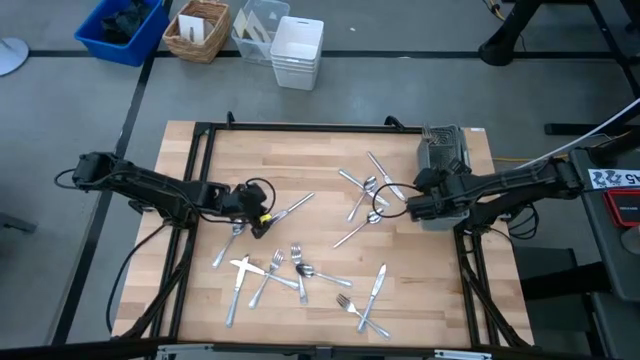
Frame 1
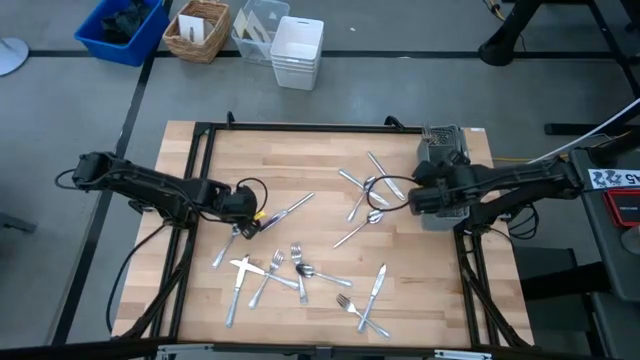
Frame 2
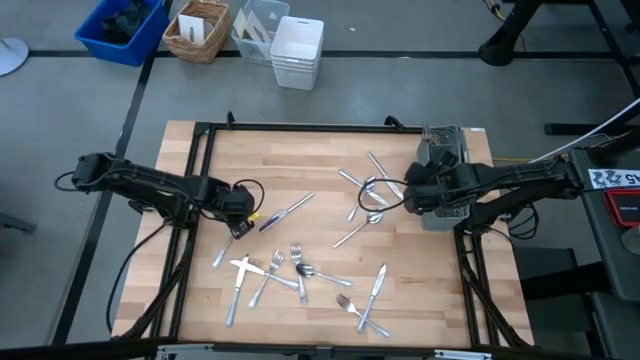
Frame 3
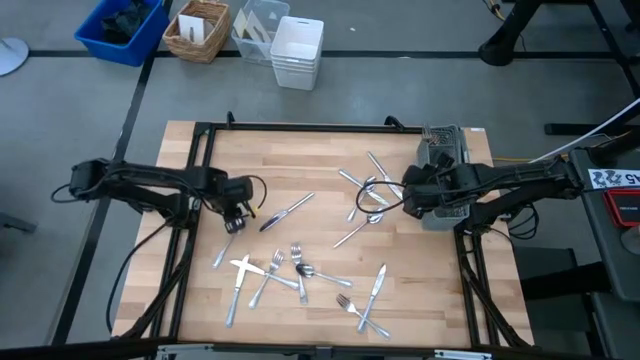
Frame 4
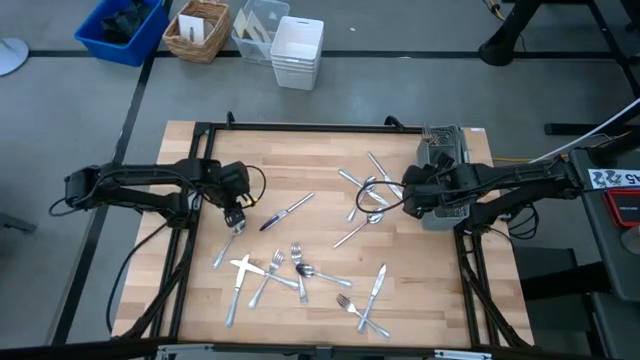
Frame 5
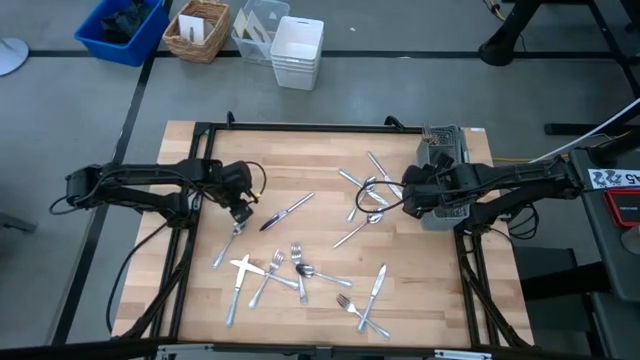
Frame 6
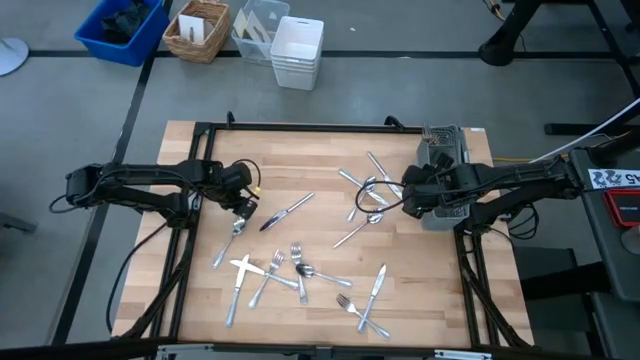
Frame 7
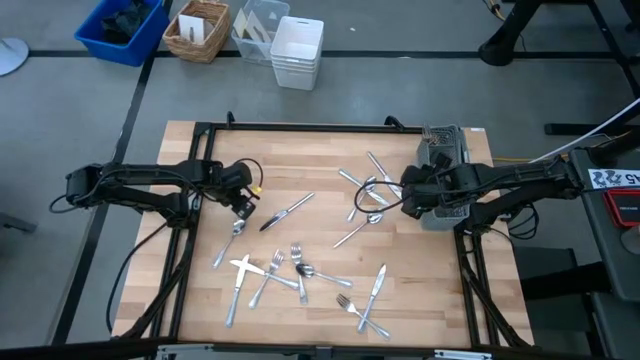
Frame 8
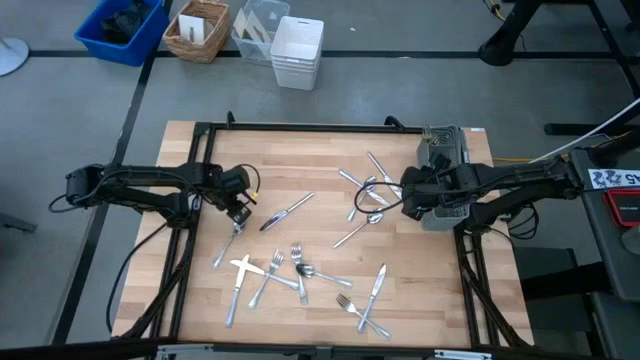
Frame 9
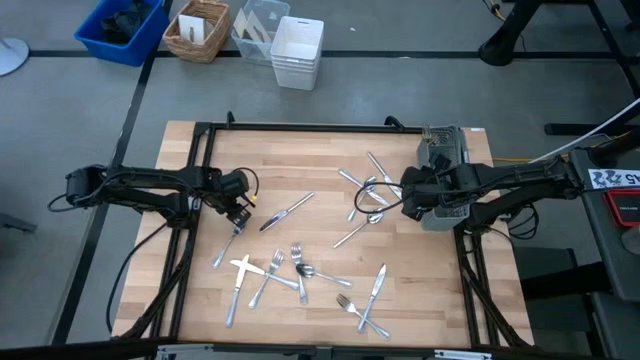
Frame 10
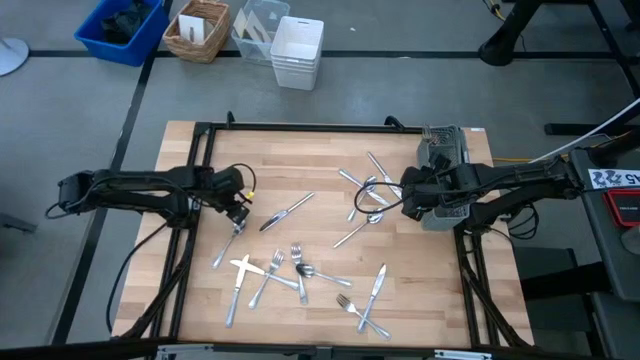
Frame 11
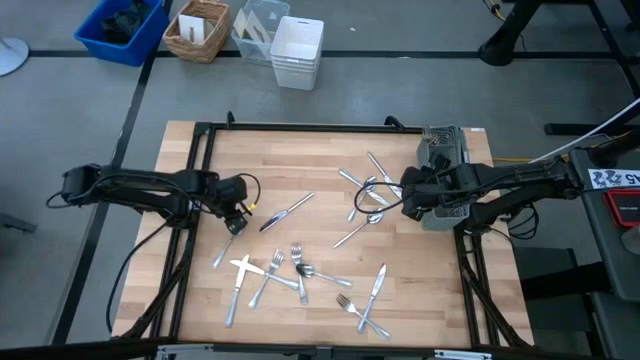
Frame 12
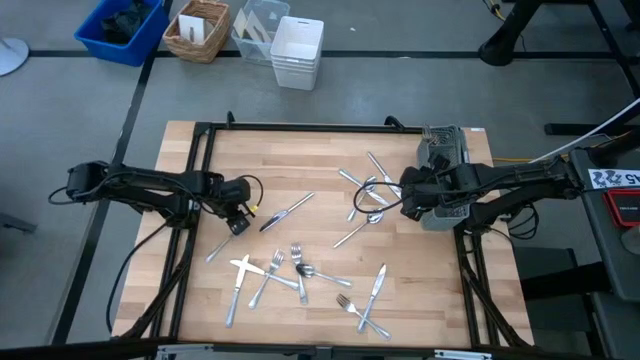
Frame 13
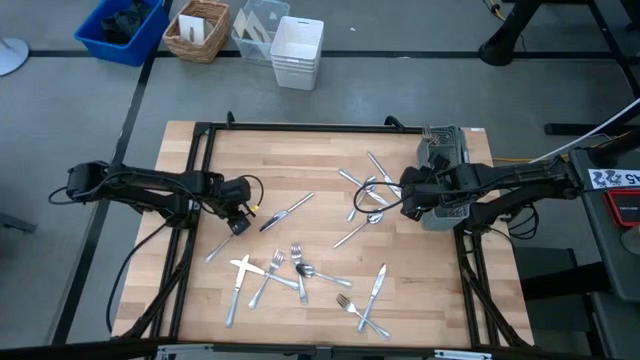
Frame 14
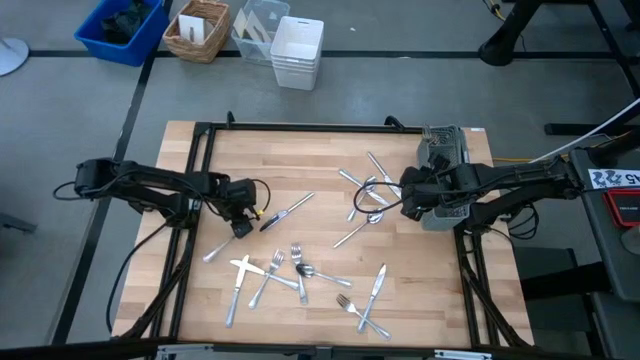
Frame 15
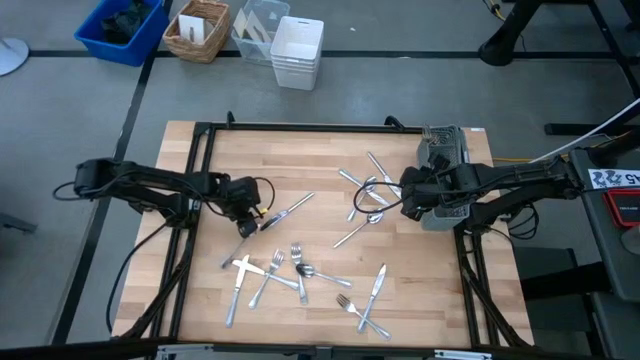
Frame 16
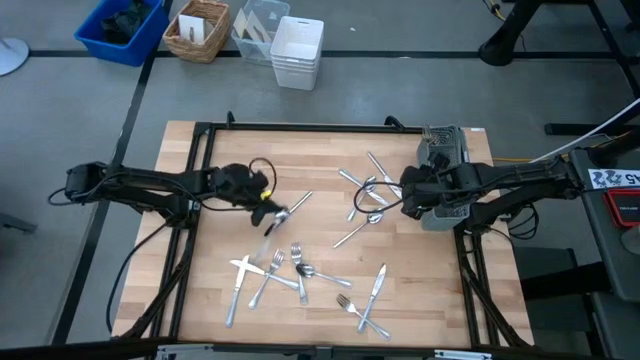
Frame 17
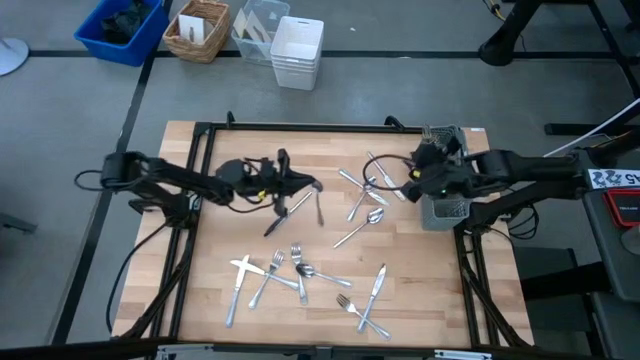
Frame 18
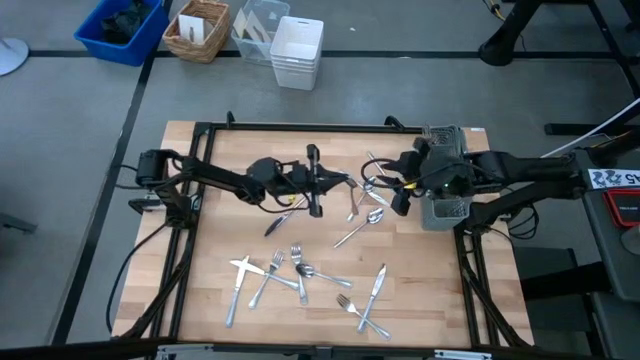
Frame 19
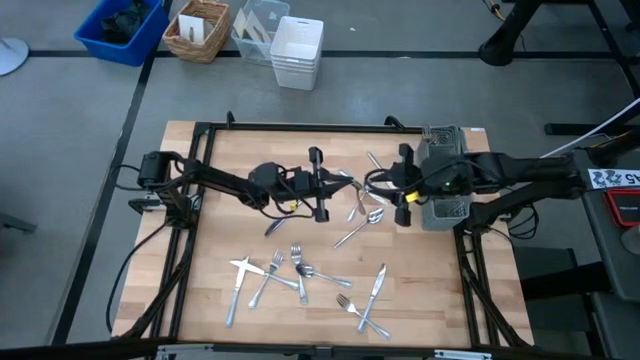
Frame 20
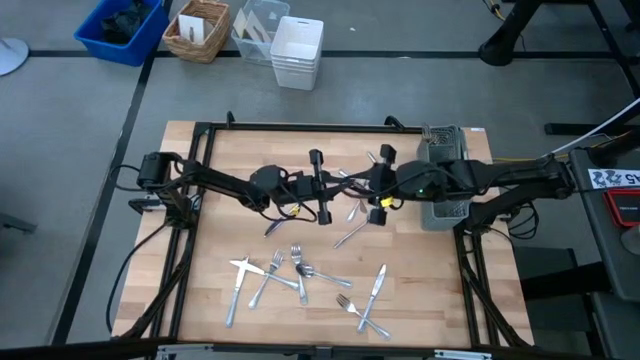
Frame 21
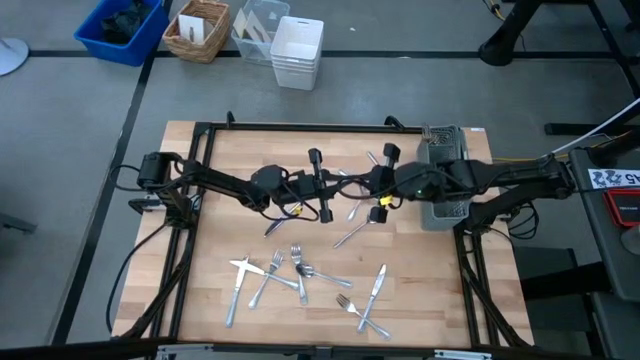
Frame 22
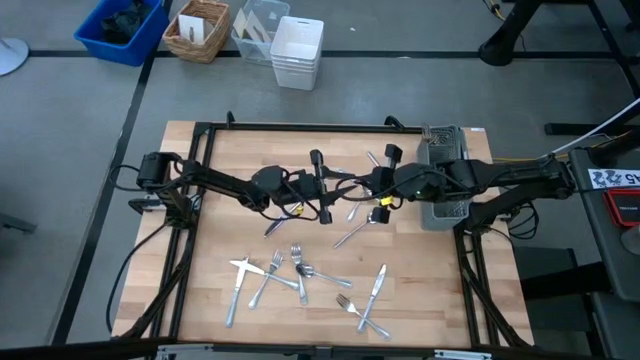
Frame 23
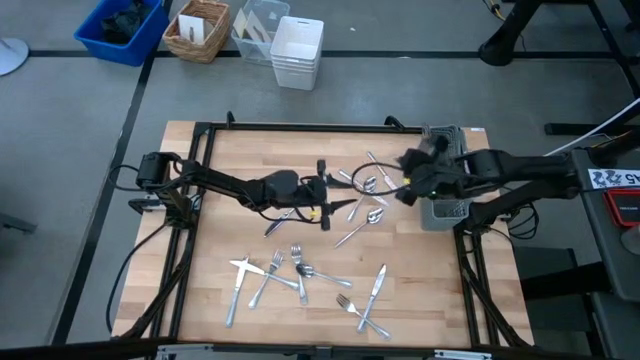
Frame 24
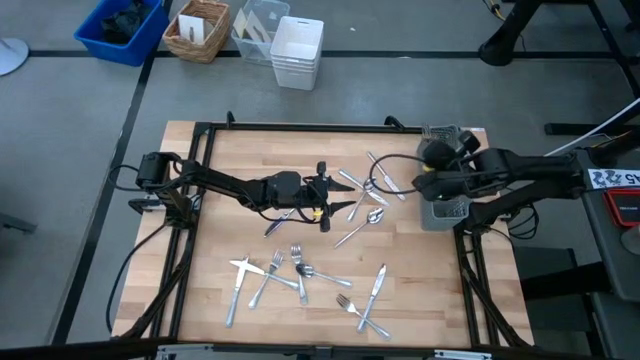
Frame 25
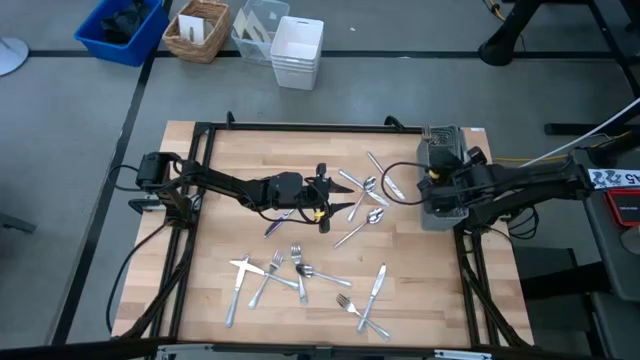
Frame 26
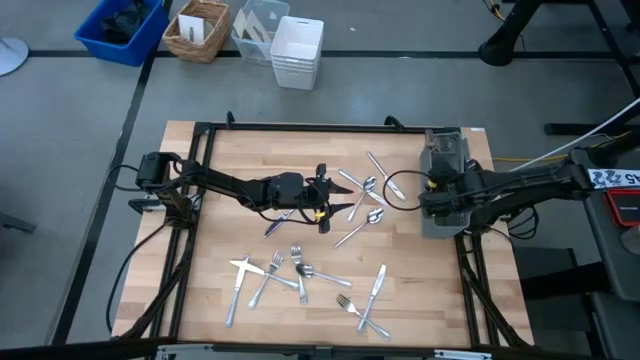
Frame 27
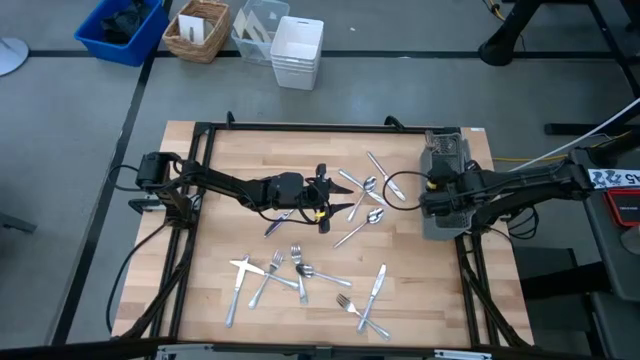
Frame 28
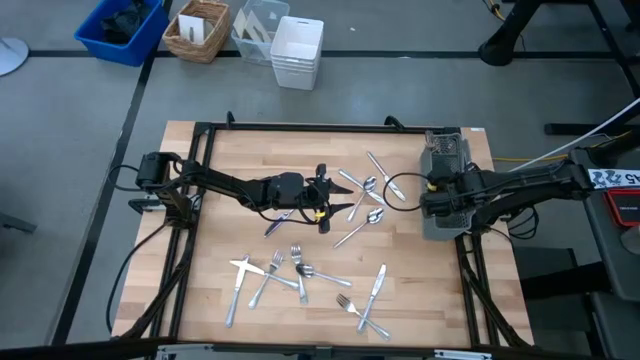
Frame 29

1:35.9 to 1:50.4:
Task: Sort silverware
Put the spoon into the right section of the utensil holder

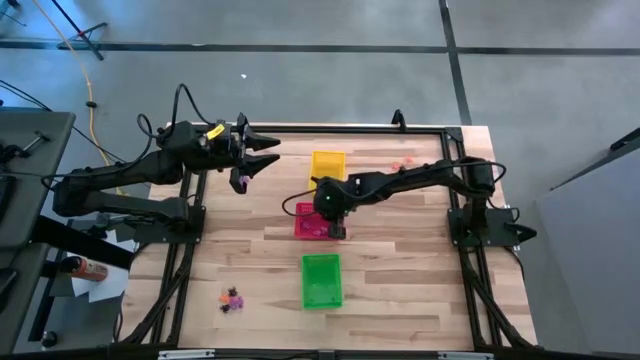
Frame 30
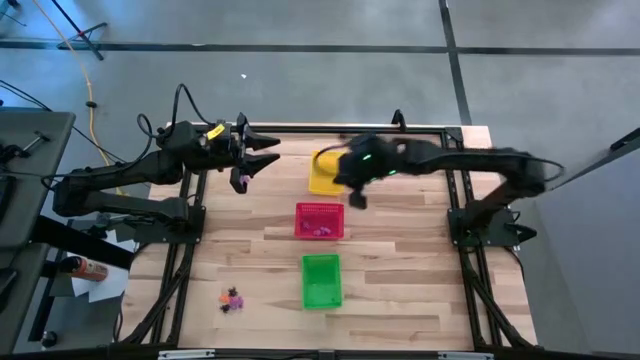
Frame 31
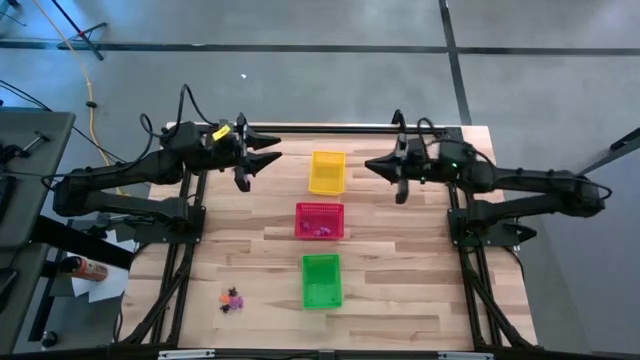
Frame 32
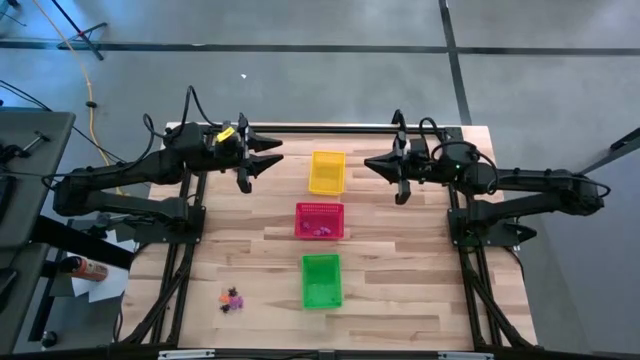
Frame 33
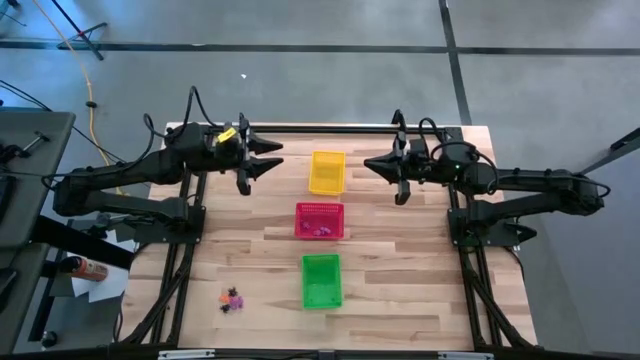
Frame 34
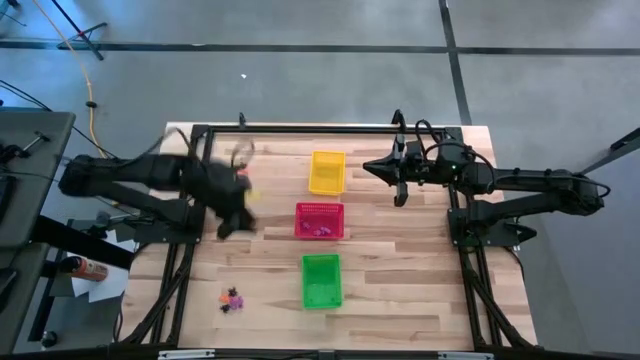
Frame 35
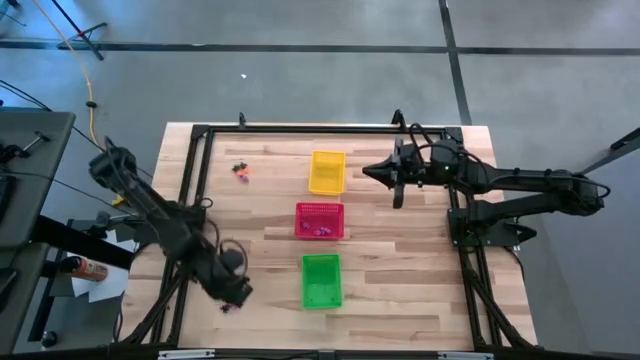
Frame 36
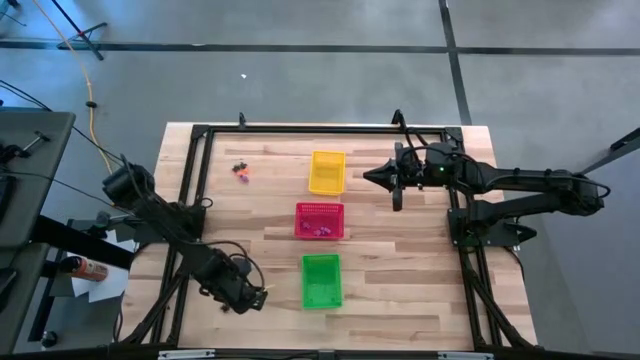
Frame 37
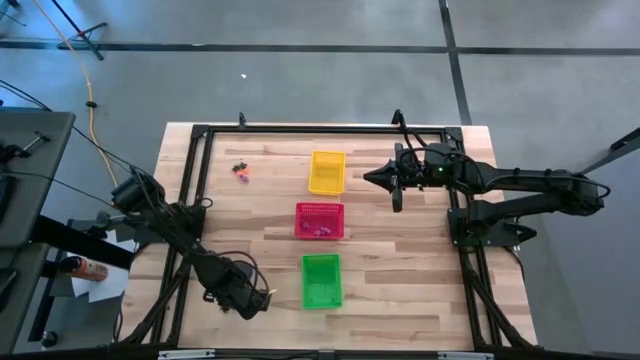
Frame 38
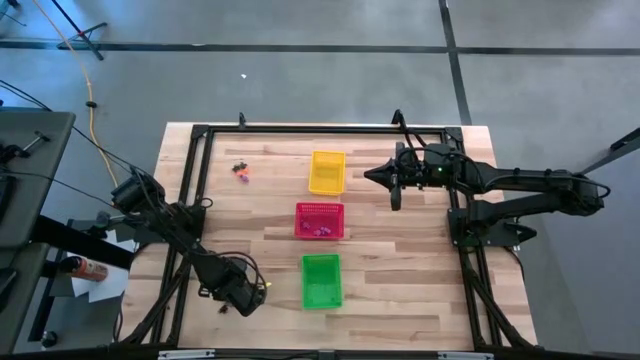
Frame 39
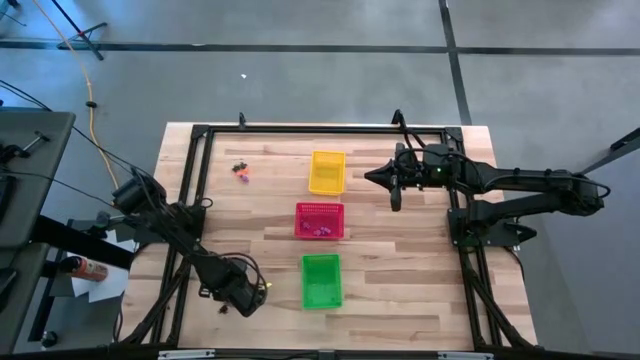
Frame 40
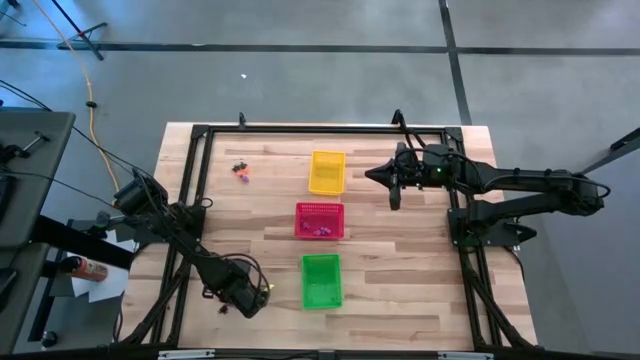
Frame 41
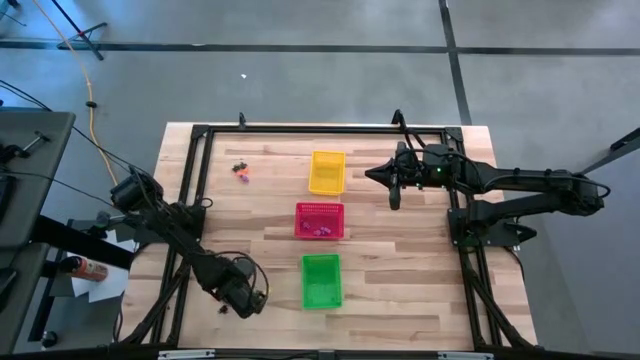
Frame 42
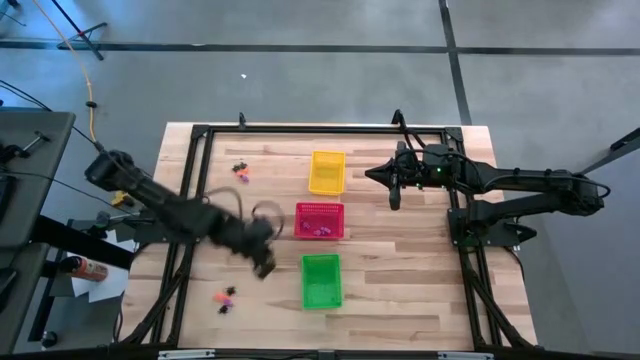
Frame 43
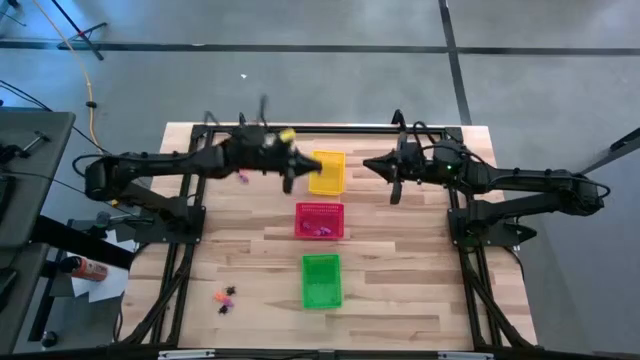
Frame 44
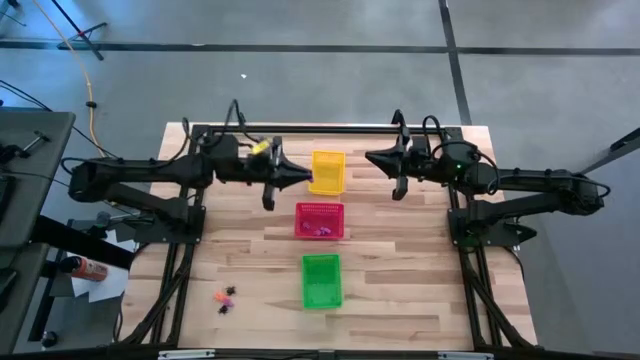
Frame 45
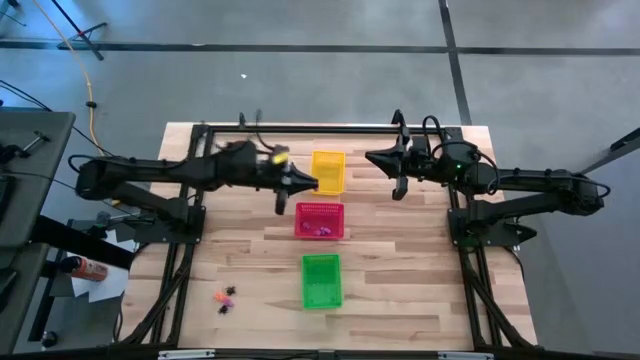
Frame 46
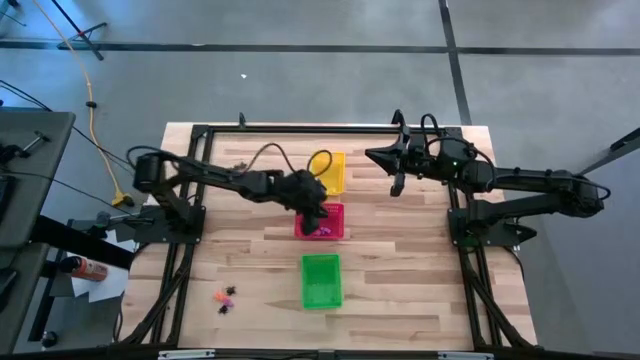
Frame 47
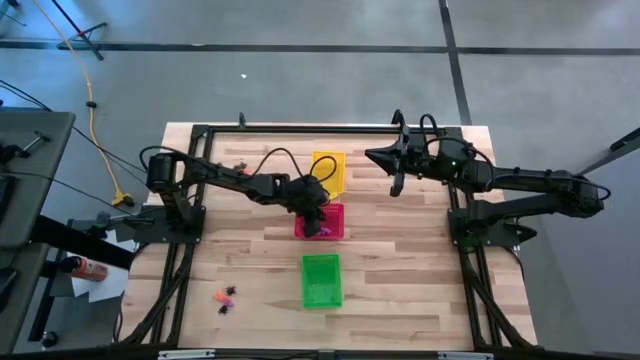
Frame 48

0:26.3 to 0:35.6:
Task: Sort Halloween decoration
Put the purple skeleton toy into the red bin
